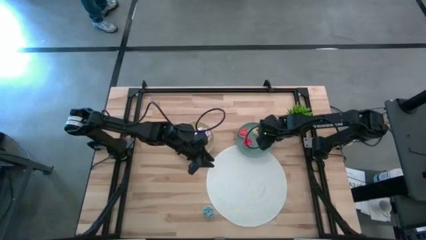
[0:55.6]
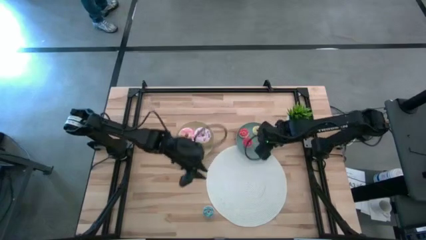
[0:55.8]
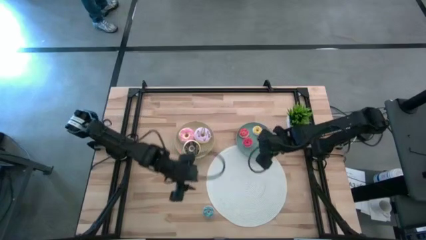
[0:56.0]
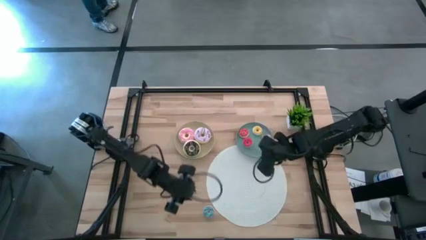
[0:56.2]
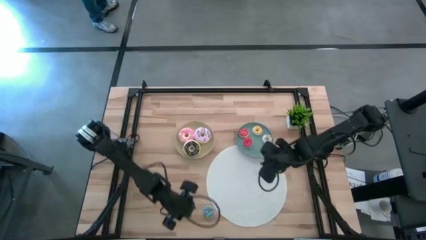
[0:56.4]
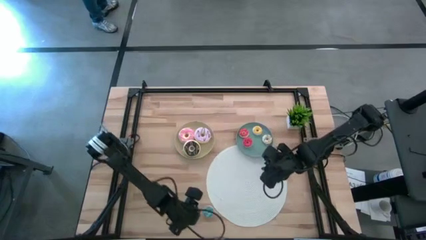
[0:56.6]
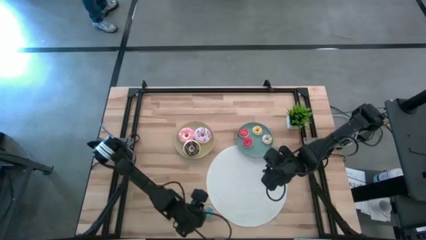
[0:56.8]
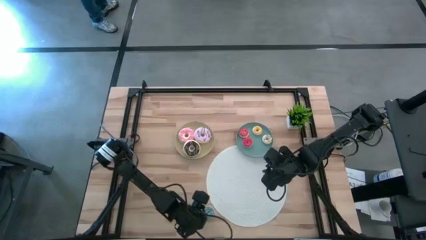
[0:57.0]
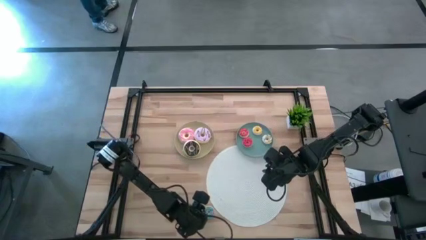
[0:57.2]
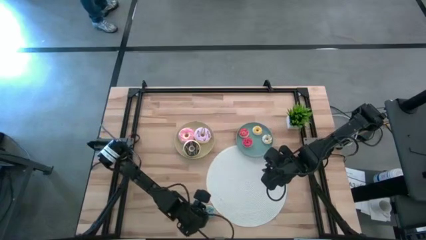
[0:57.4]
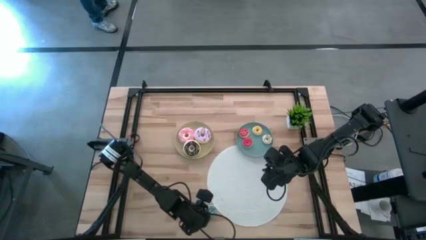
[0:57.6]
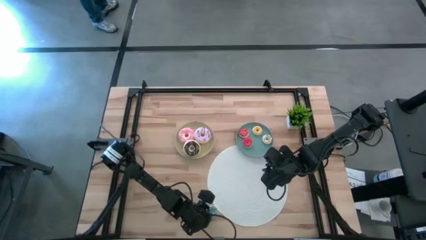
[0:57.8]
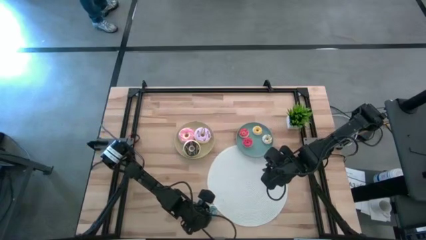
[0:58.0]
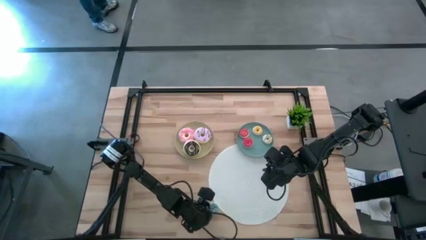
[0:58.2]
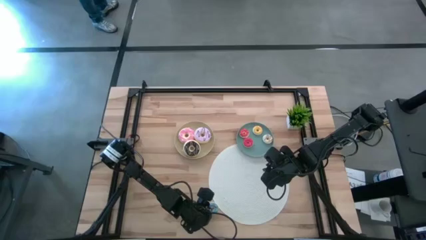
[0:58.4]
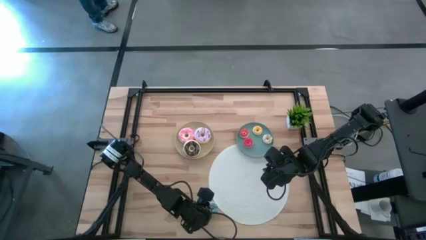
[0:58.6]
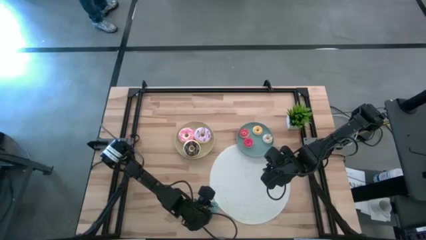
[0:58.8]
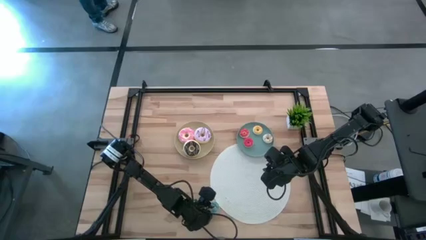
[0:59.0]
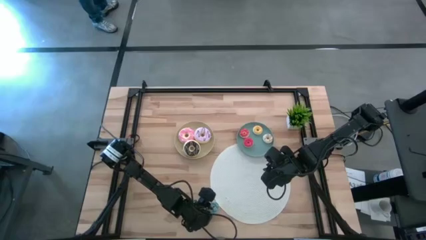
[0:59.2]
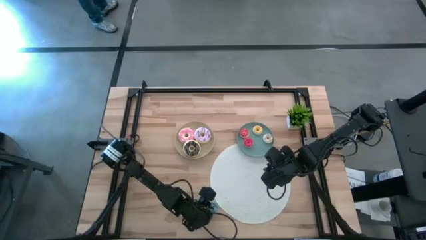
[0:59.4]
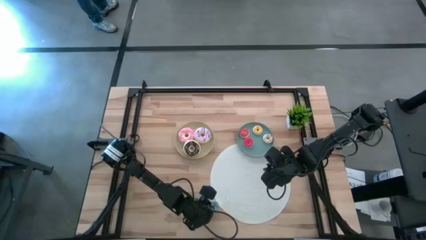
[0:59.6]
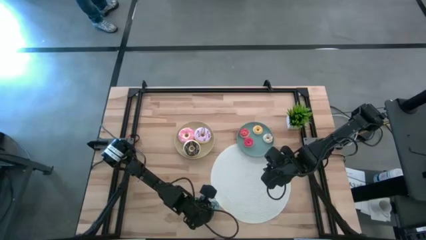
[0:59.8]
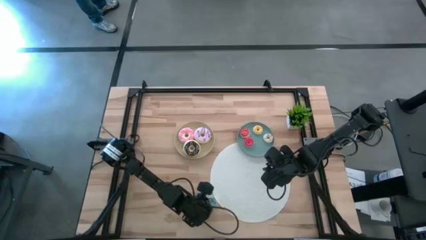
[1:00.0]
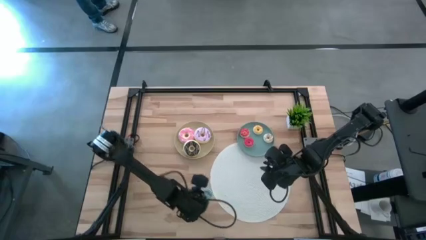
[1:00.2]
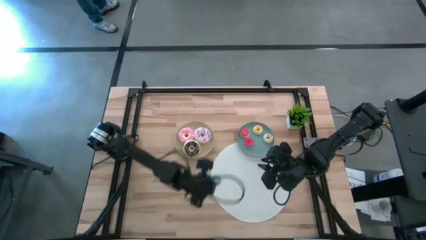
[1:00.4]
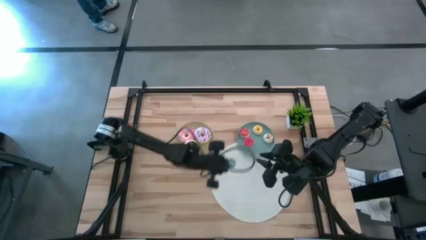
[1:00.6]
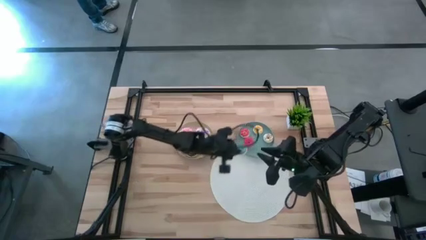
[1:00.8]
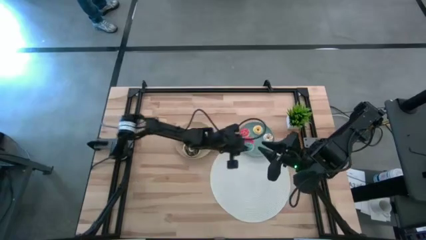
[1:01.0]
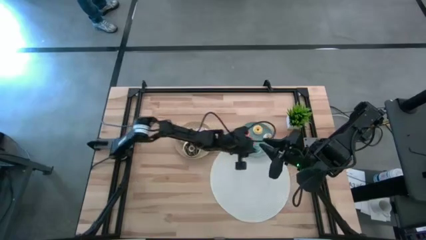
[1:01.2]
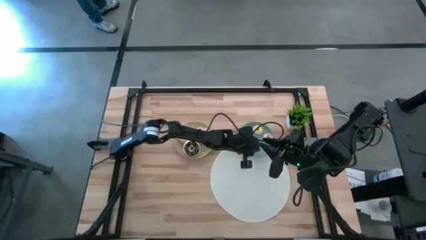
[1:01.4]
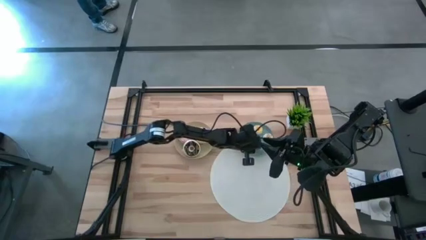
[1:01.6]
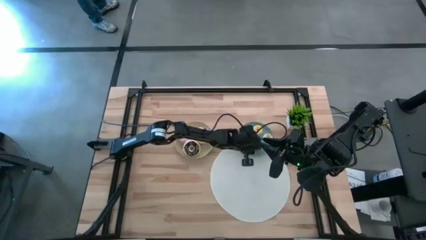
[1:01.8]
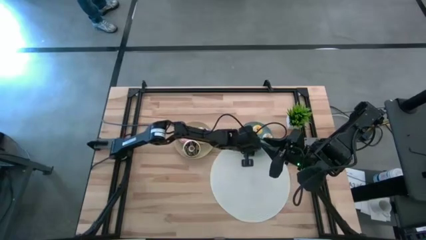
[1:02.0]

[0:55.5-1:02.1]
Task: Pick & Place donuts
Put the small blue donut on the blue plate

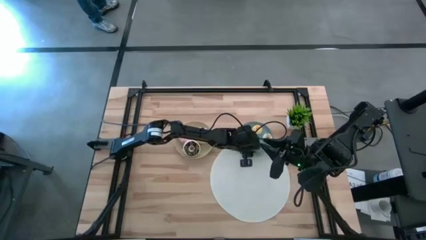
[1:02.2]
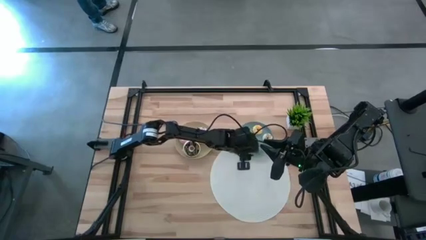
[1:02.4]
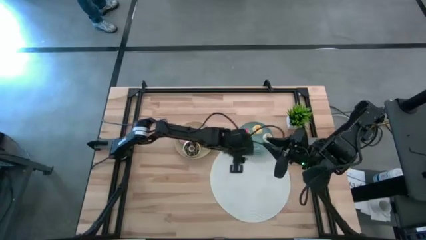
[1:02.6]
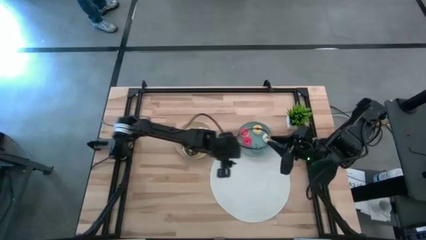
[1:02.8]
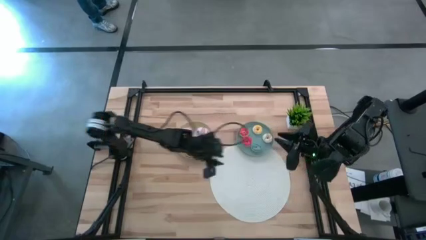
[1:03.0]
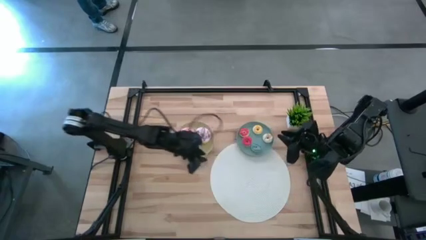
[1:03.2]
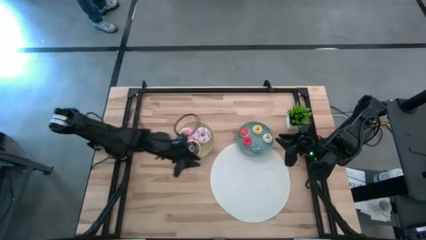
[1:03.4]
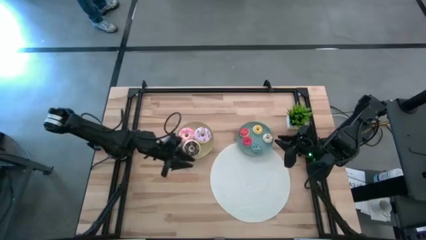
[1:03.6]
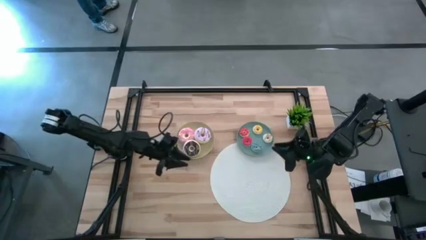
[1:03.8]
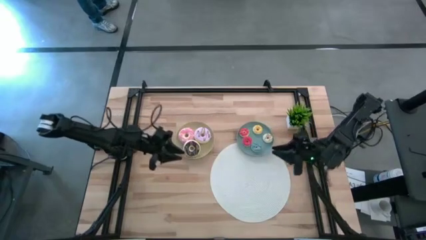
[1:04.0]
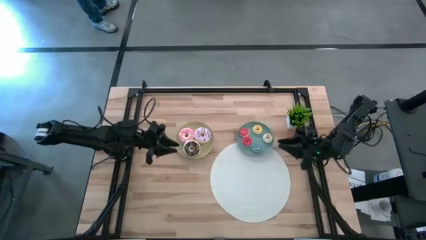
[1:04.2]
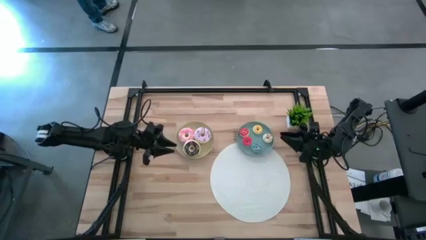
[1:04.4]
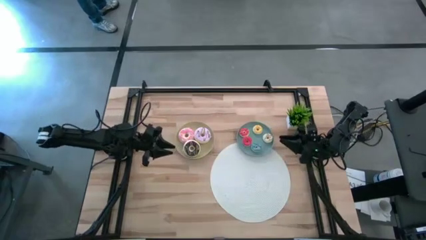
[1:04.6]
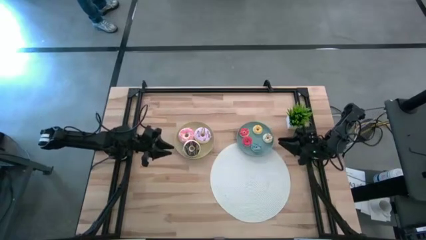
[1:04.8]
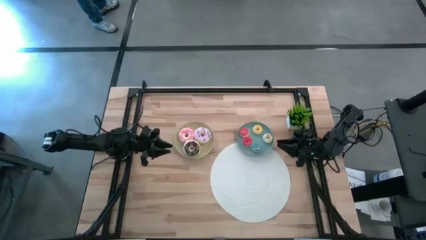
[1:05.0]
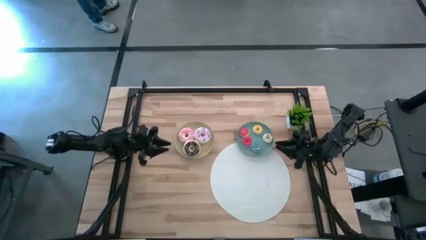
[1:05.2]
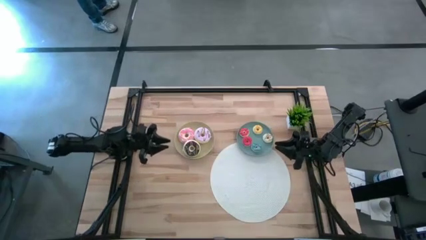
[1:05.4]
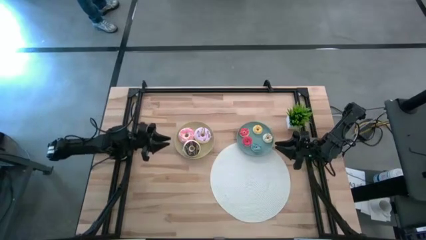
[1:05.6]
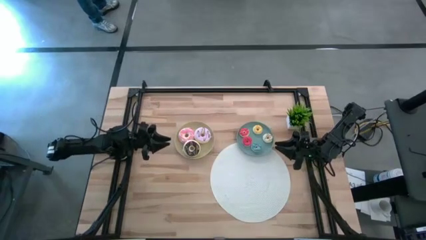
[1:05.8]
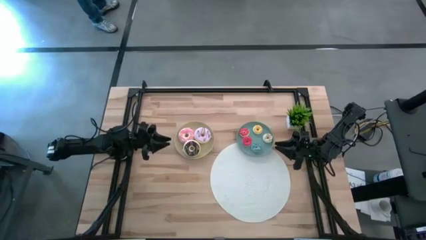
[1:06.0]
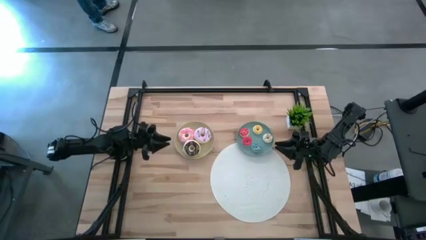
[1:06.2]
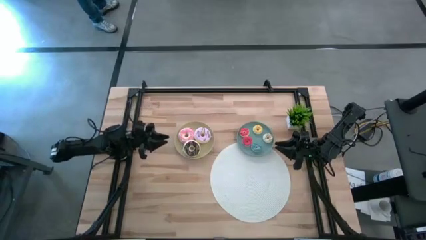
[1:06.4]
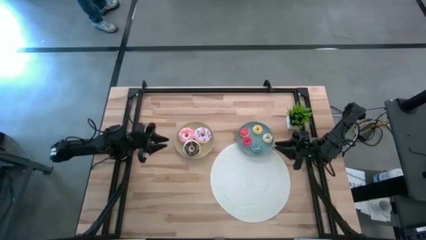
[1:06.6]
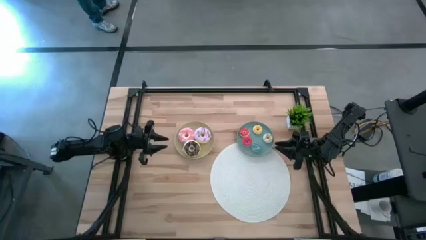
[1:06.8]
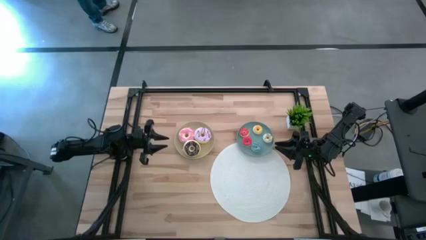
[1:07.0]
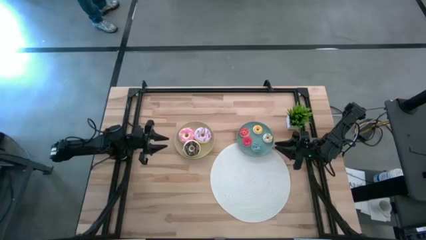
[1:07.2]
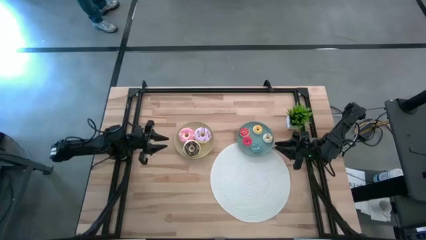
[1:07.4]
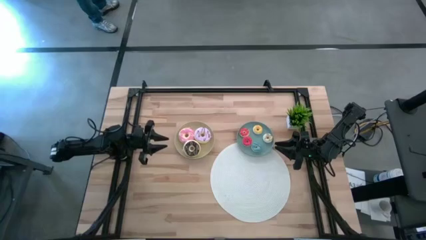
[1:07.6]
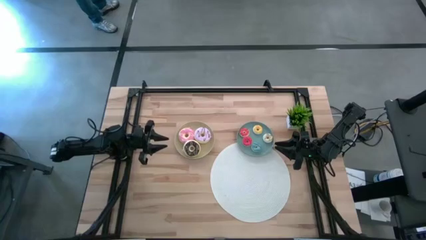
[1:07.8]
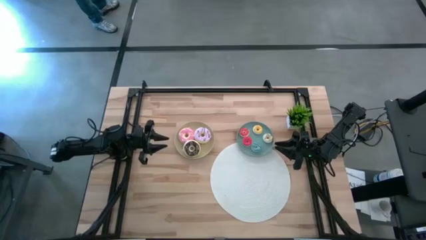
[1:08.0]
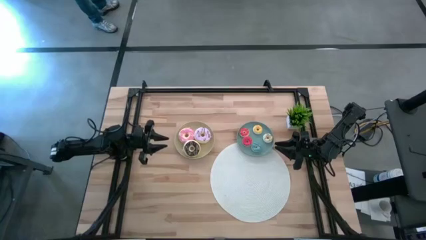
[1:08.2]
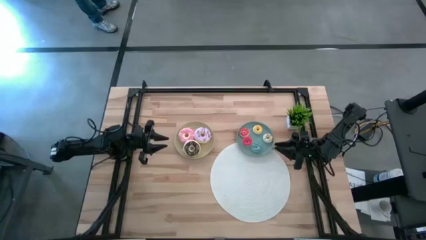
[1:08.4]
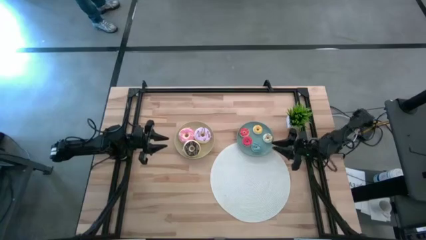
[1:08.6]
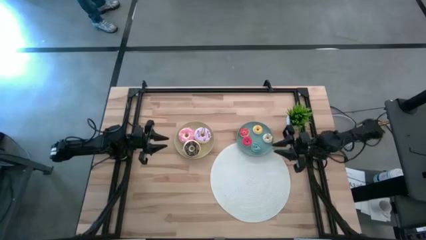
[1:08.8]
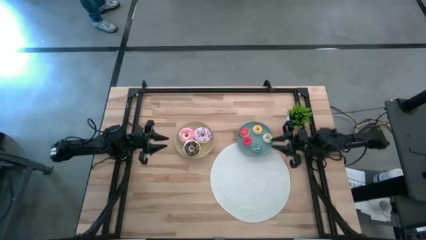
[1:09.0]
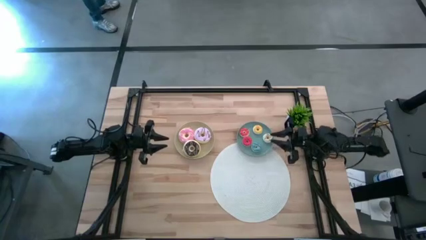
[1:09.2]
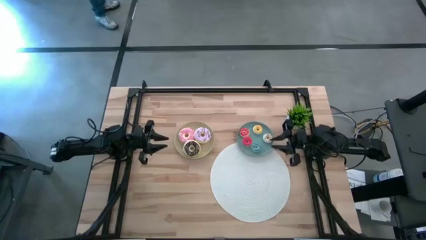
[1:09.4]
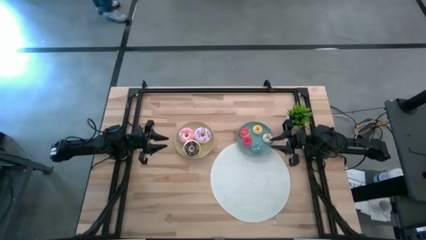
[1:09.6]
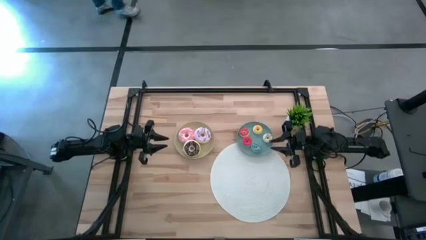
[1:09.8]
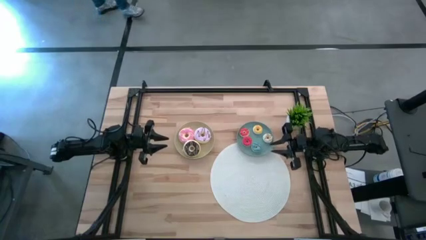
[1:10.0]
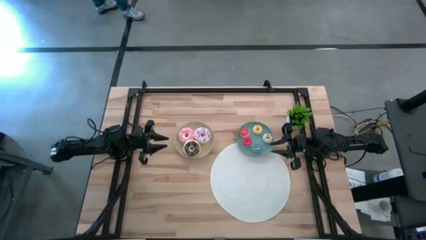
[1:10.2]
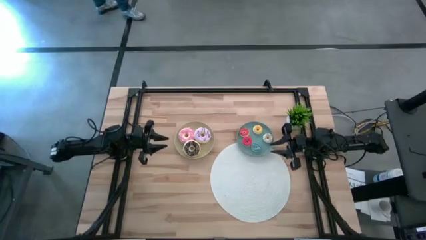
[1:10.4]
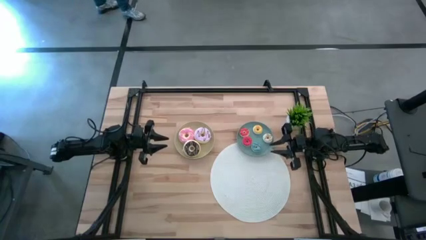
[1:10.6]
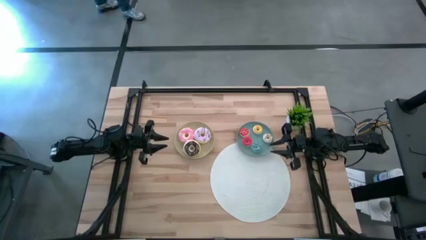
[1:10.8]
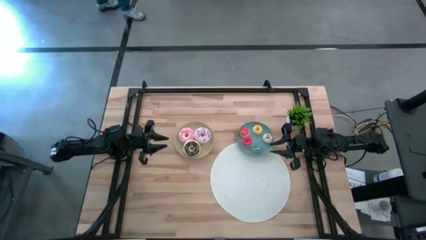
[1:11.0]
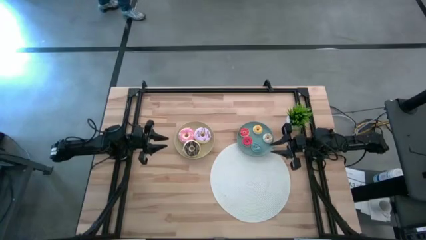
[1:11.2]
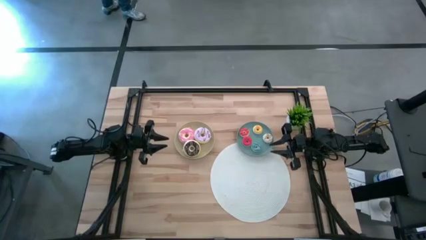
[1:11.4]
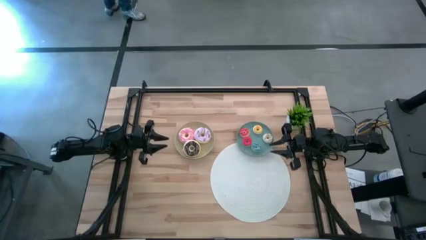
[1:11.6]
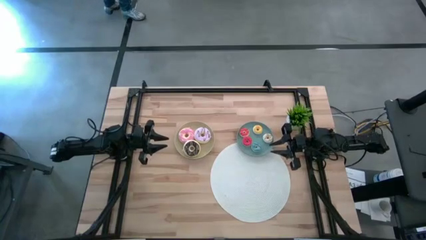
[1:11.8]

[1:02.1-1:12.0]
Return to Home Position
